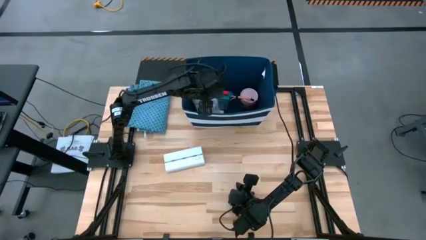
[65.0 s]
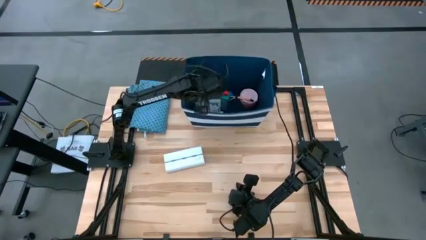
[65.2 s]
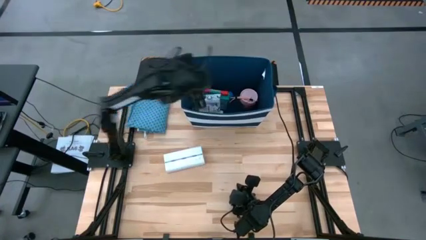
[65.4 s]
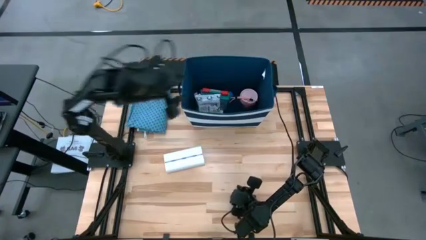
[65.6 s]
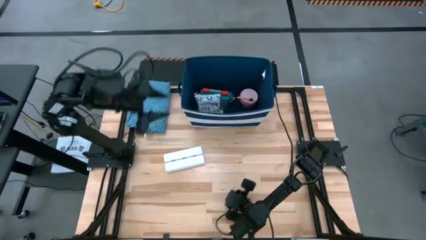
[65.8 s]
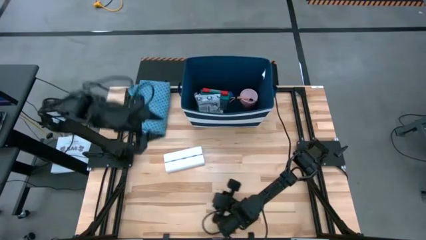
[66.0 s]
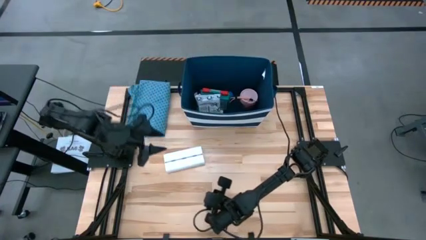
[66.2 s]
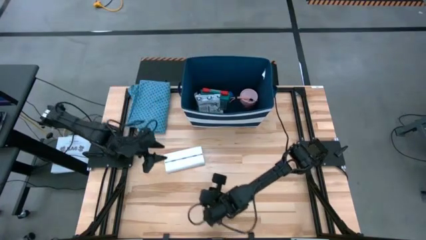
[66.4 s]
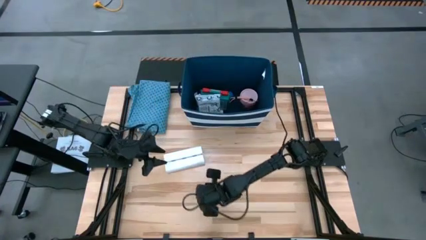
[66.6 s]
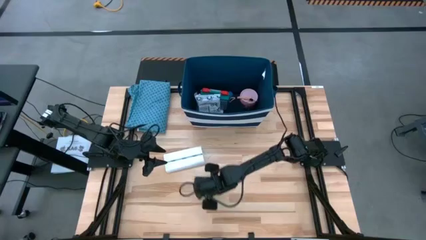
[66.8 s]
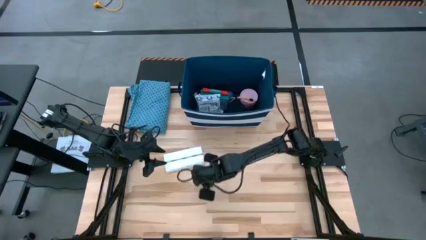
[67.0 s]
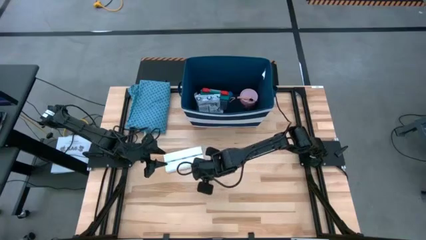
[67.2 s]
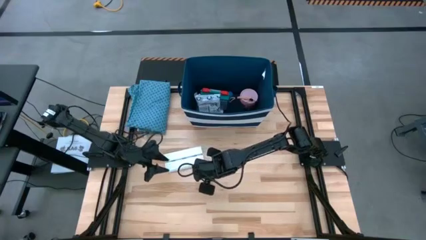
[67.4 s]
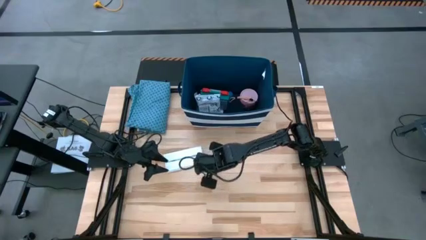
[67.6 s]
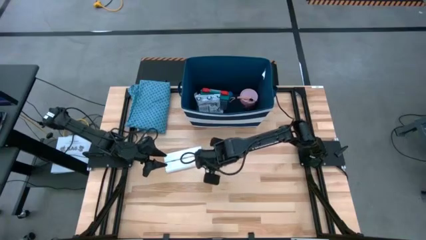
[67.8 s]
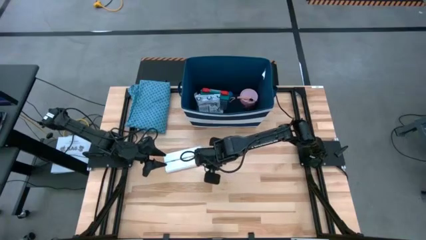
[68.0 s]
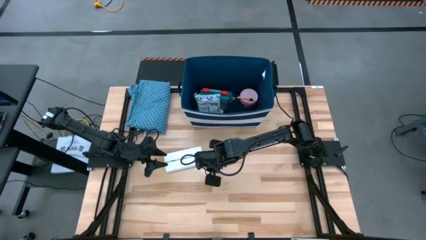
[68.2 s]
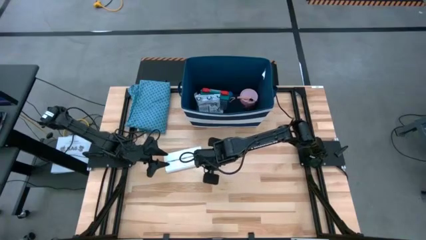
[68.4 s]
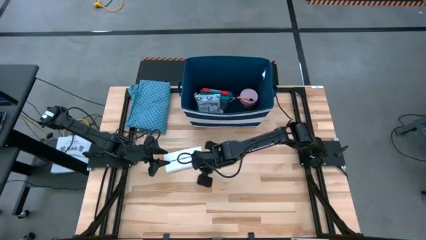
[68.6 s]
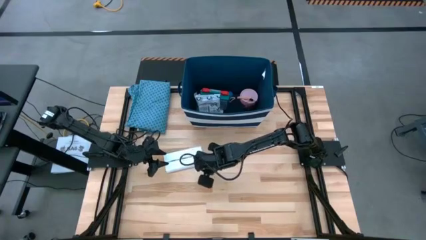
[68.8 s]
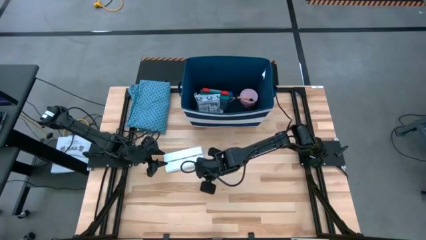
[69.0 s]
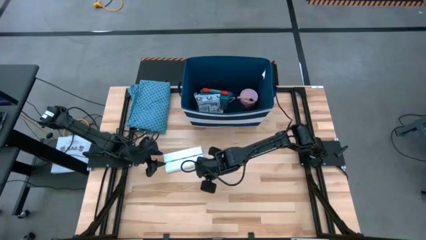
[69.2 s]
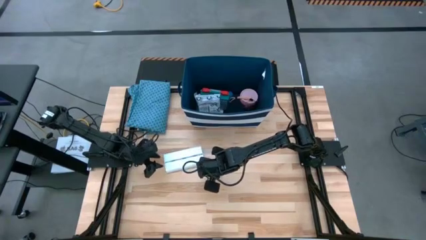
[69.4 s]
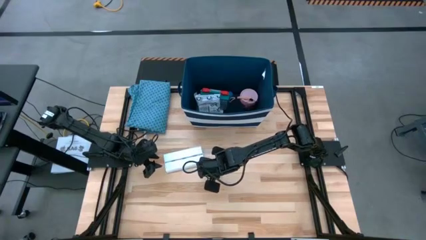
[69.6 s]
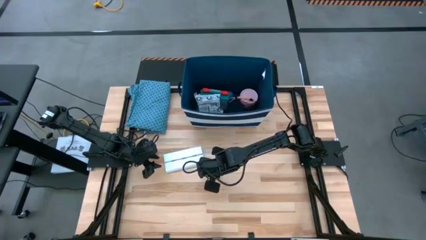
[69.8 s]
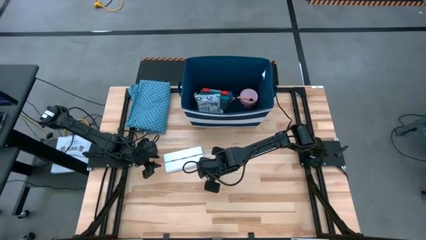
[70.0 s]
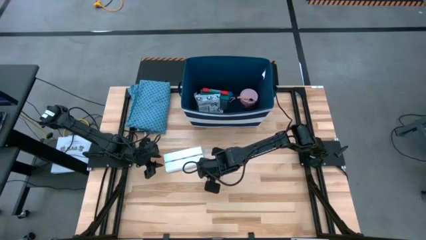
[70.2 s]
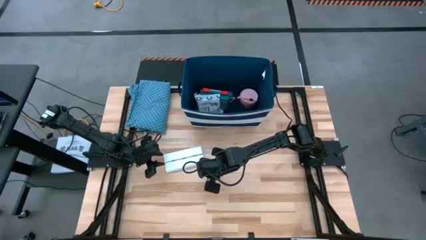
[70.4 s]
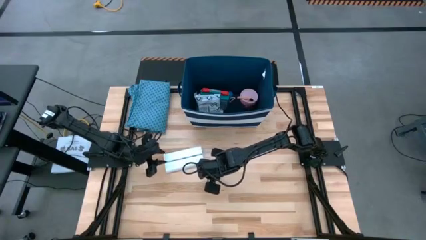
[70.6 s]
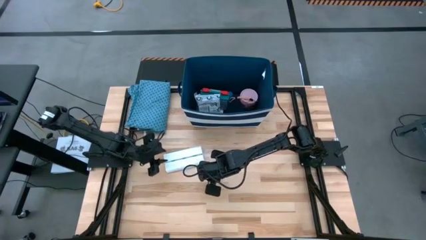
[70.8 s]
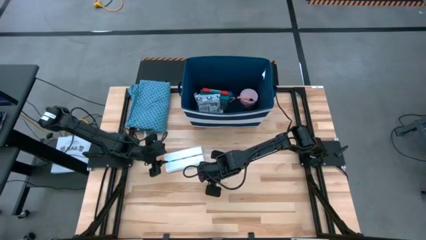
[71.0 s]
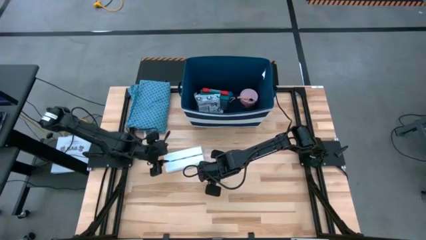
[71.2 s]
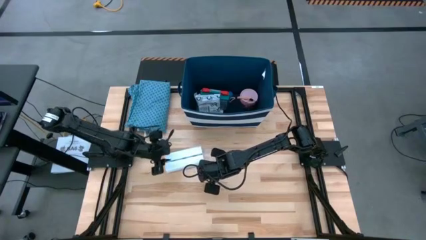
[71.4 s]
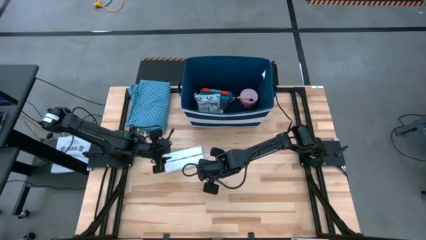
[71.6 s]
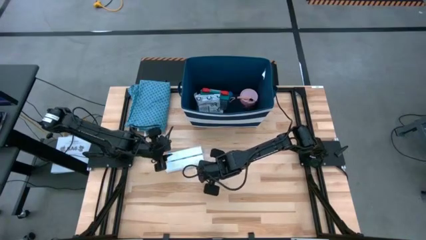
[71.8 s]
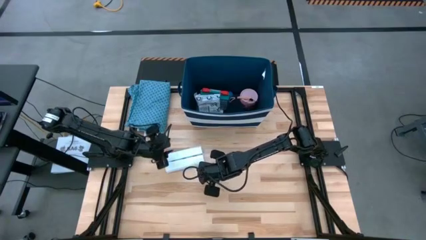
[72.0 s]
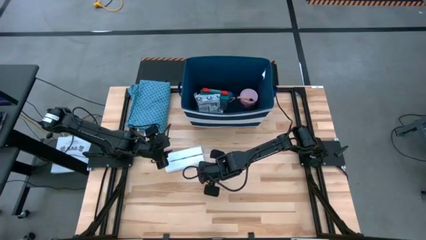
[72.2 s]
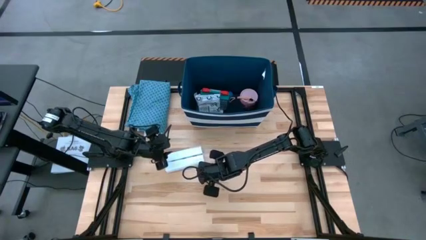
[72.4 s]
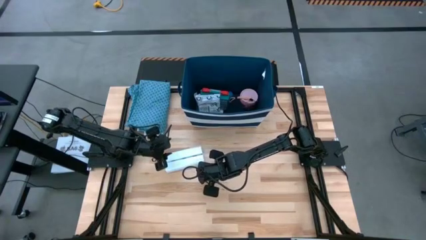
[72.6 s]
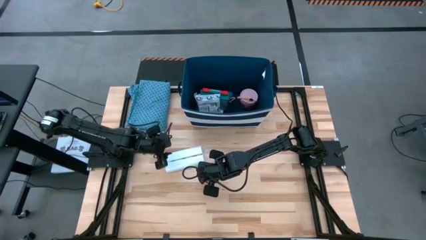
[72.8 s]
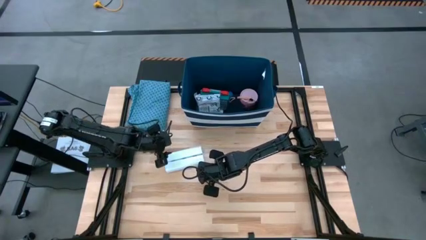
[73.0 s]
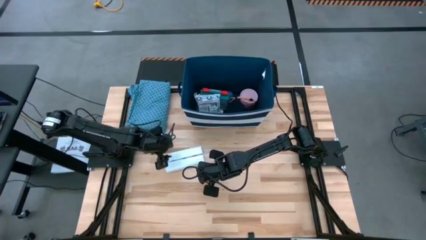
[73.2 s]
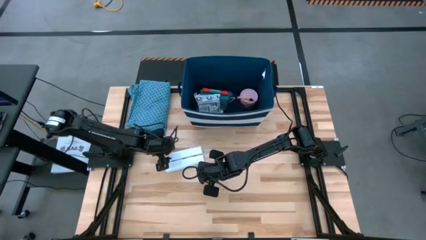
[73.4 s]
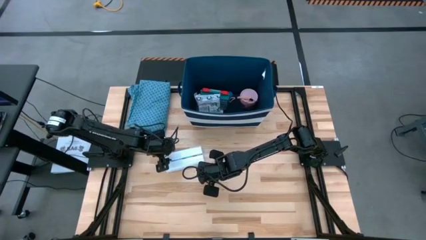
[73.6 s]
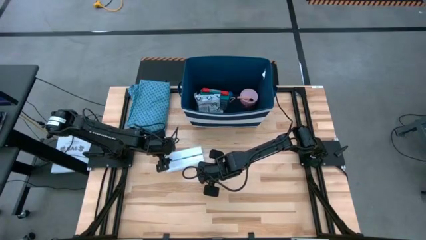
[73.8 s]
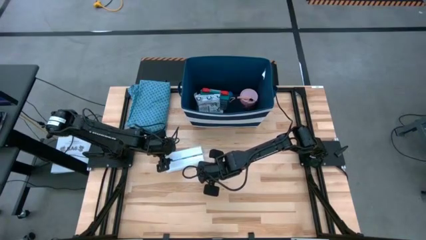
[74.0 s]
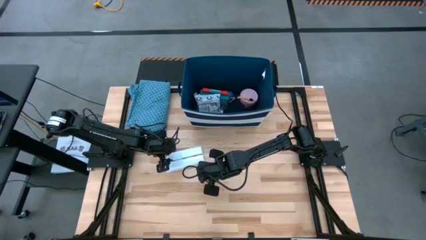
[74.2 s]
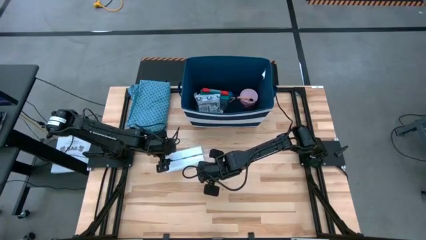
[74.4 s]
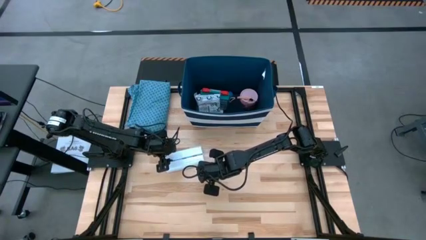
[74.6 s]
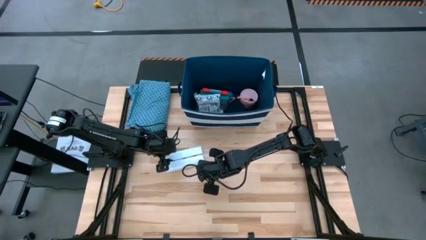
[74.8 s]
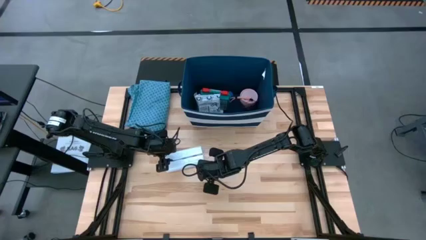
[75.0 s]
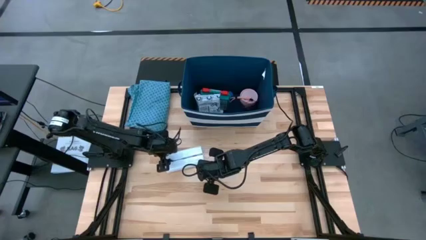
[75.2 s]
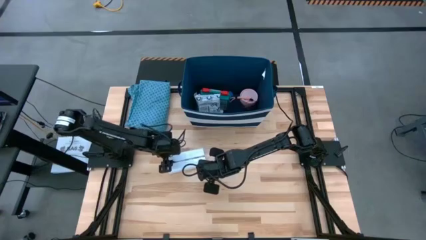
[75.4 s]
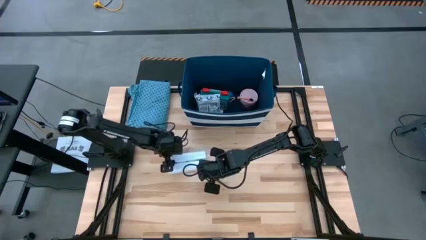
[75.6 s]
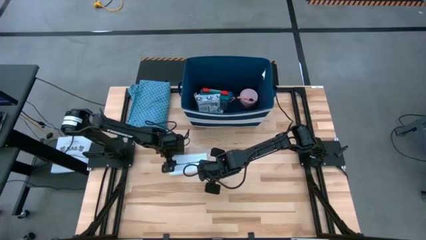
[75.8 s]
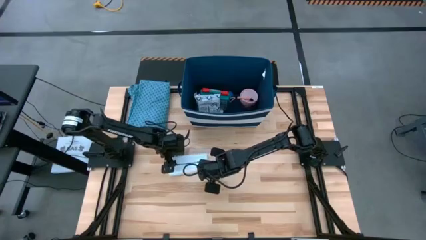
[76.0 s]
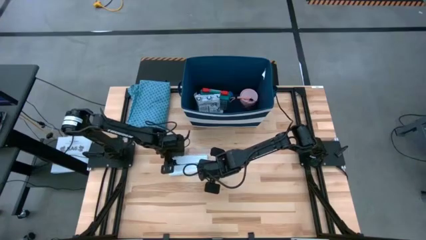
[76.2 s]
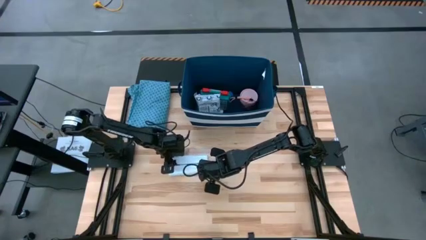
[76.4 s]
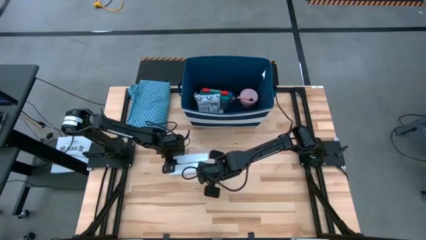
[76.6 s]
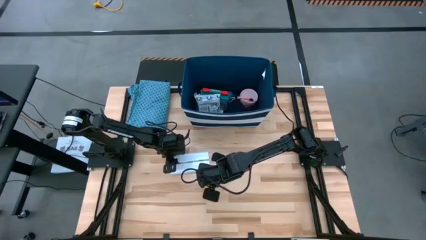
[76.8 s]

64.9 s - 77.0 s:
Task: Pick & place medical supplies in basket/bin
Put the white pill organizer into the blue bin
